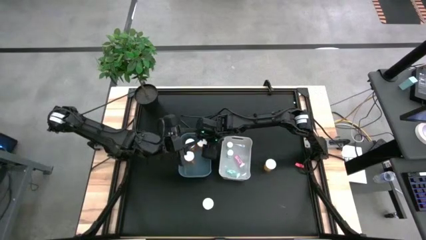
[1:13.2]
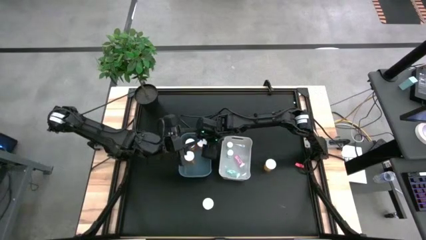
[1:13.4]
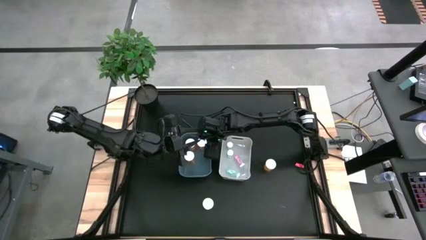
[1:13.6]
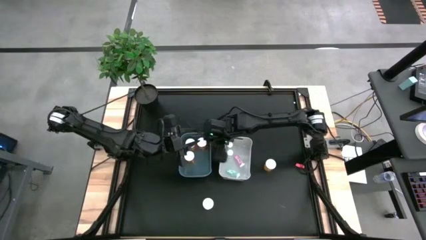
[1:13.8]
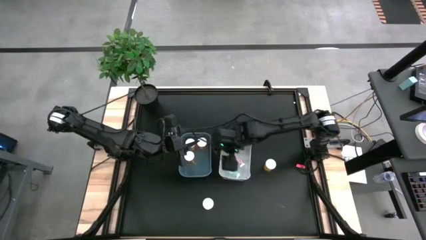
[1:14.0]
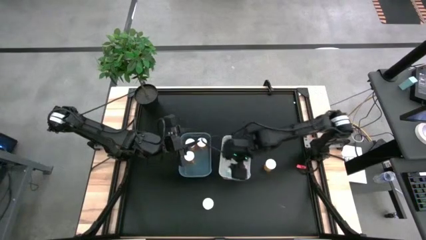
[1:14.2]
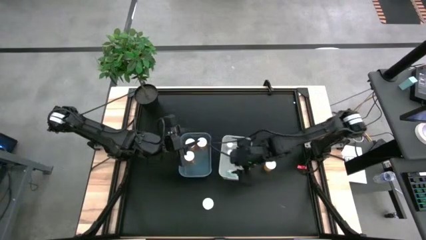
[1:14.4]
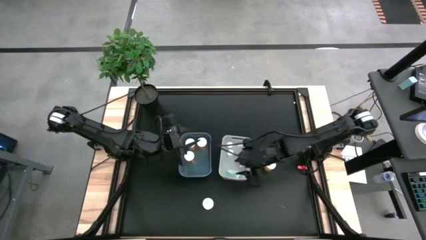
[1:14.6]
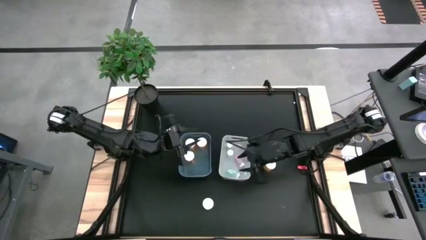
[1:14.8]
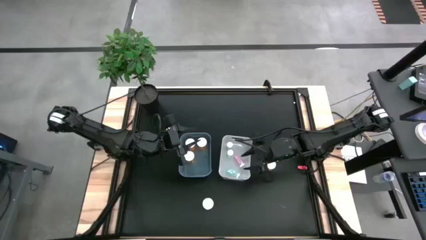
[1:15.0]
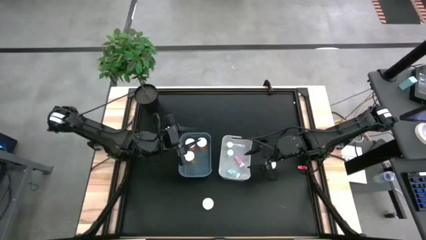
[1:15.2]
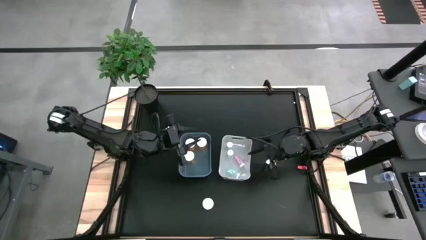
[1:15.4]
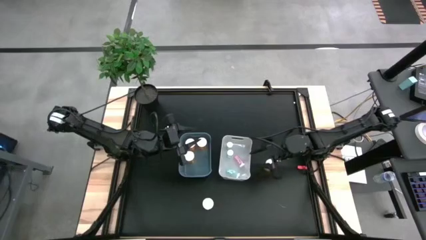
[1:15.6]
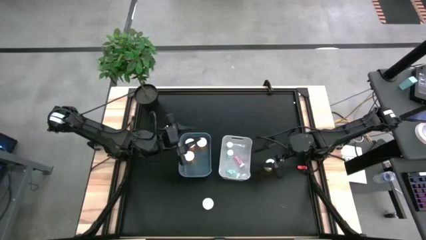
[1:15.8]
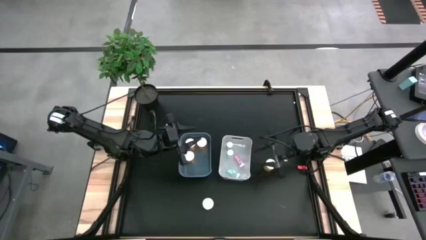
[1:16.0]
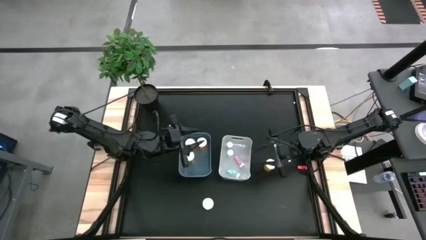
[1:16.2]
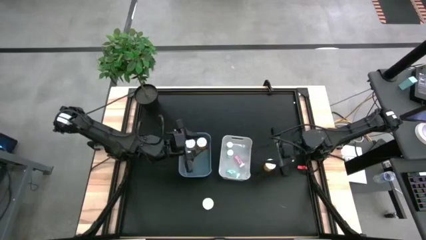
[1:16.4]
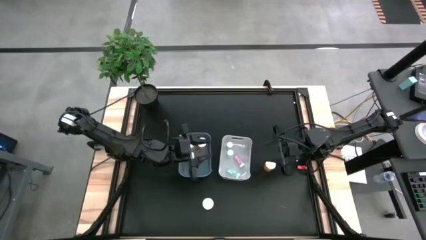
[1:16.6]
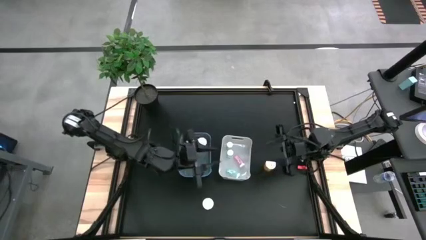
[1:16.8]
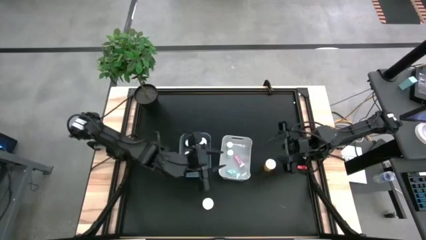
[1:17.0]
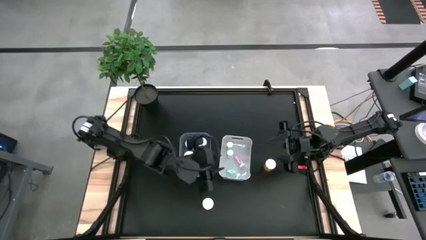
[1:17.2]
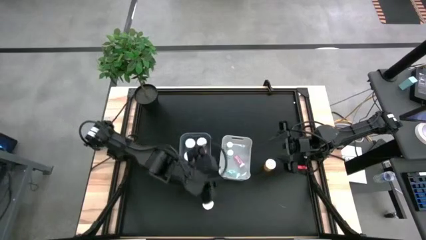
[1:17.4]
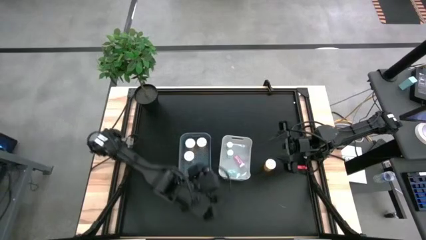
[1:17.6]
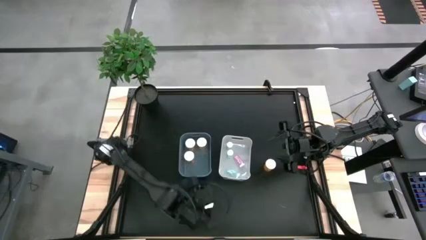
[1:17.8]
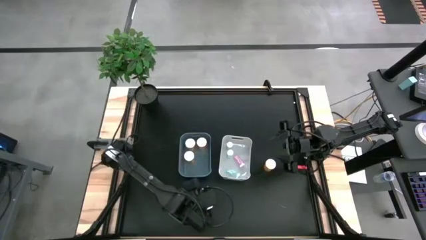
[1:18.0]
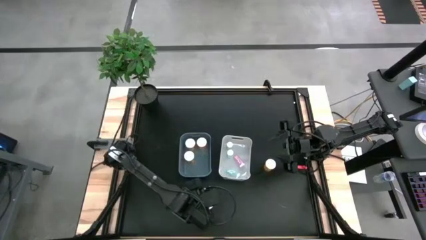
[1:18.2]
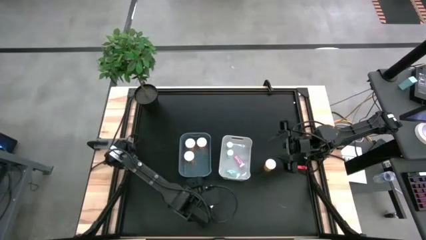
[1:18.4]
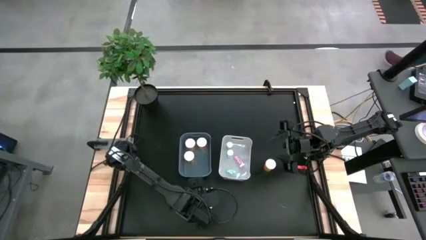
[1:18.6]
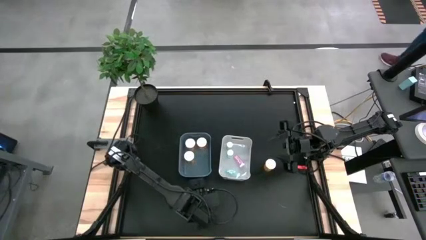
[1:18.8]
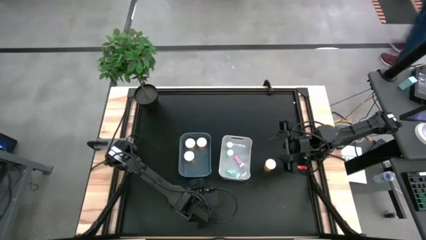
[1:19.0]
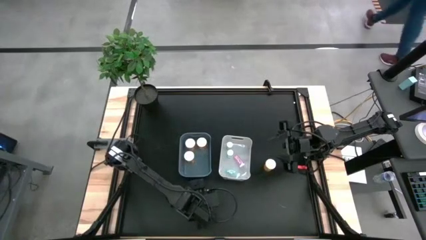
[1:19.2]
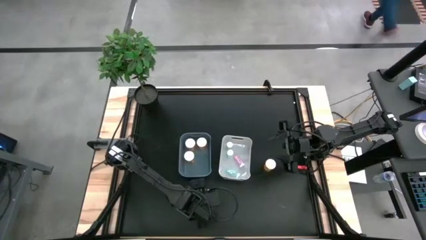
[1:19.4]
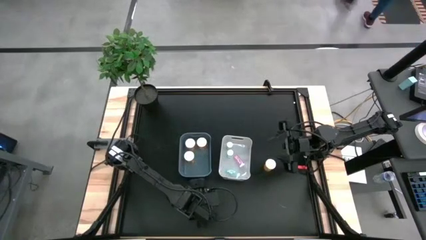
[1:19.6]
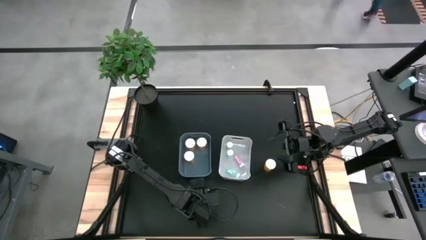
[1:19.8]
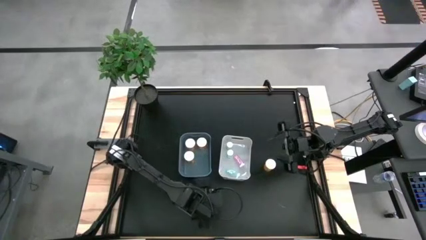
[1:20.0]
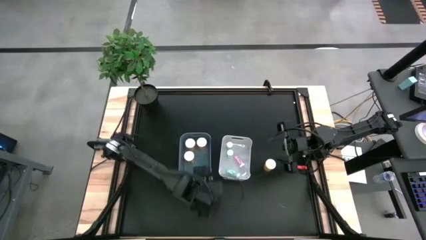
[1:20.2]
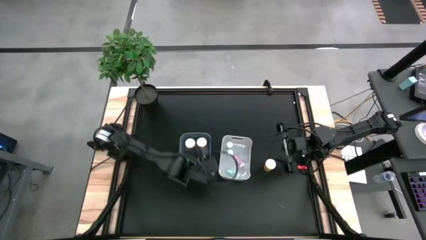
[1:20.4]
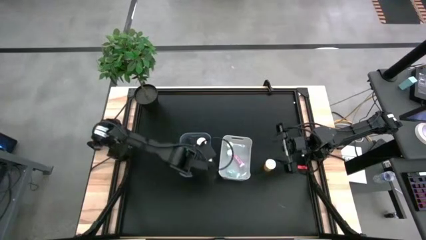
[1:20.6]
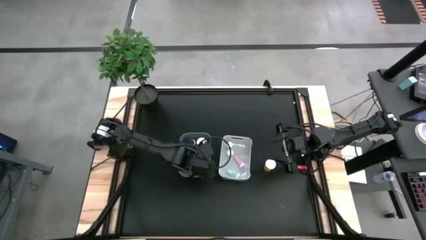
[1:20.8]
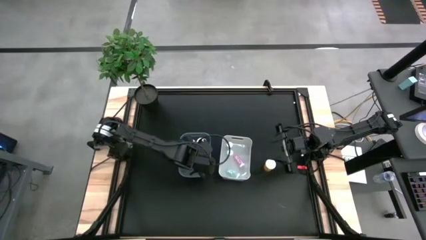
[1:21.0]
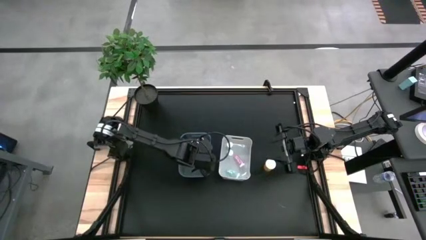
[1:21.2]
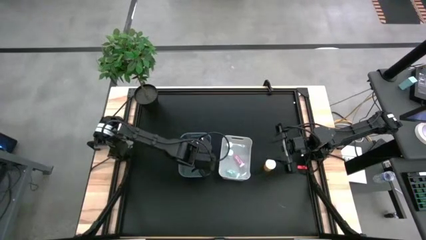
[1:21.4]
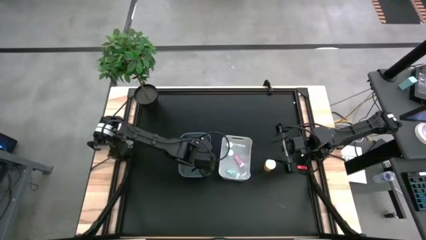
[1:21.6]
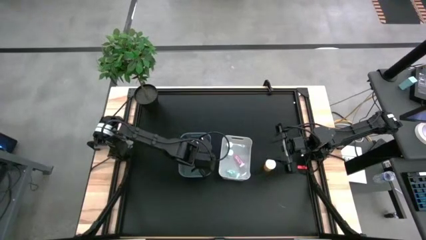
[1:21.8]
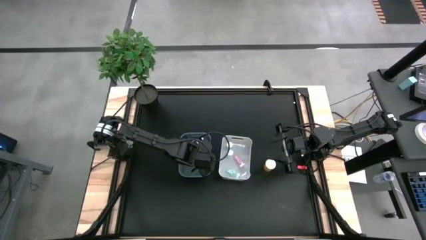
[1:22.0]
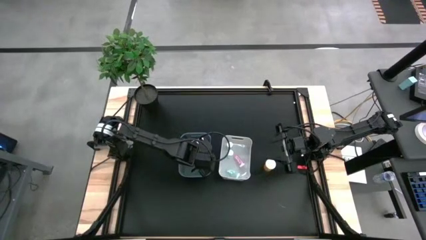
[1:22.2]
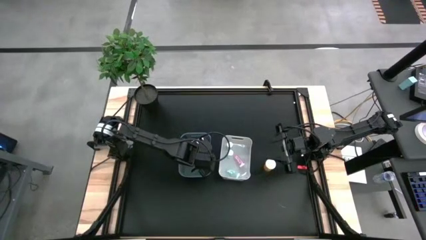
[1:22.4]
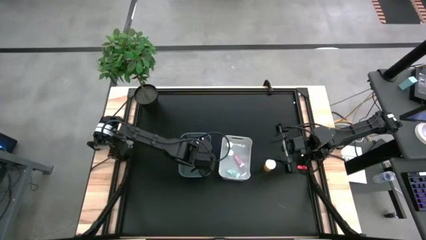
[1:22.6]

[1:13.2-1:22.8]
Task: Pick and place medicine bottles into bin by pill shape (circle, oval)
Put the orange capsule bottle into the blue bin

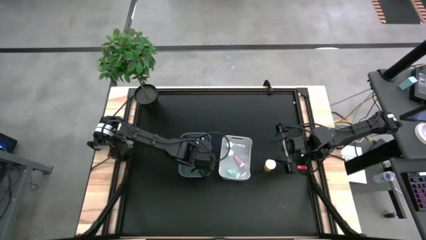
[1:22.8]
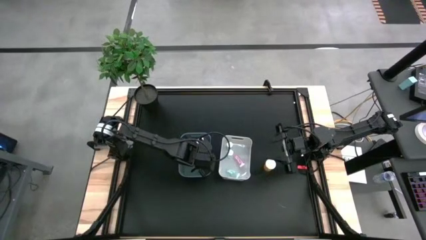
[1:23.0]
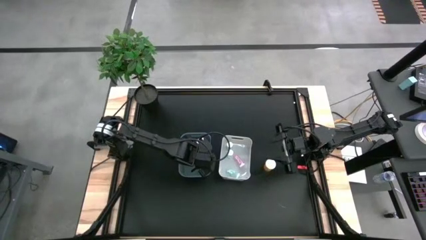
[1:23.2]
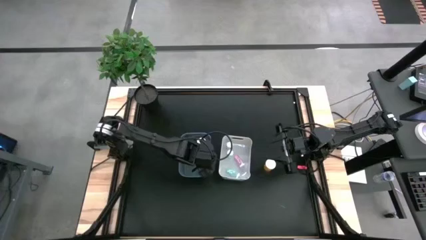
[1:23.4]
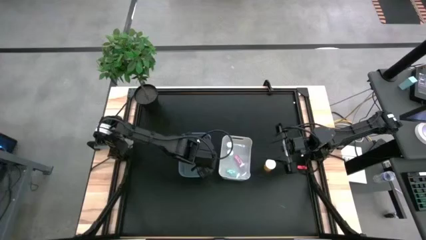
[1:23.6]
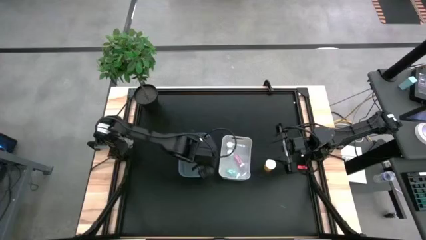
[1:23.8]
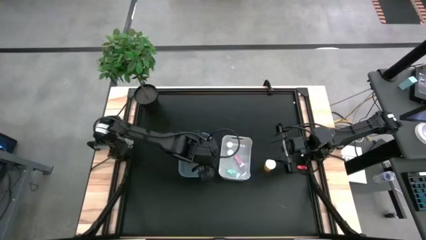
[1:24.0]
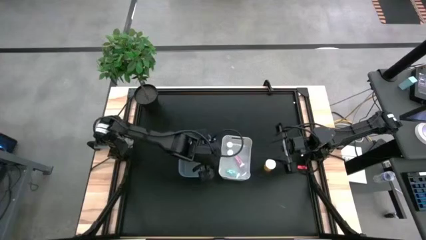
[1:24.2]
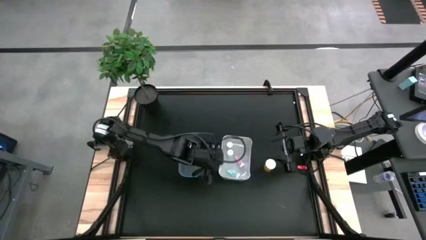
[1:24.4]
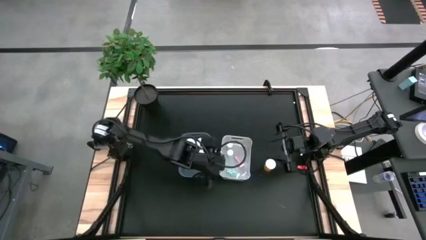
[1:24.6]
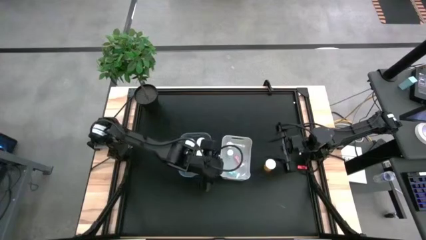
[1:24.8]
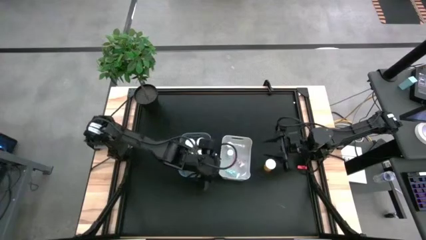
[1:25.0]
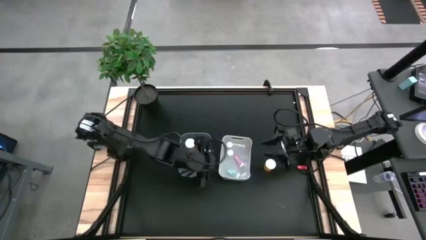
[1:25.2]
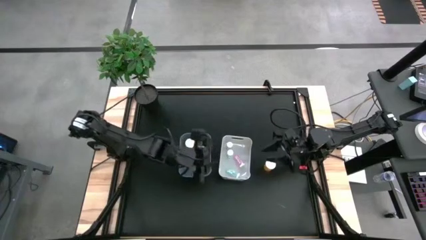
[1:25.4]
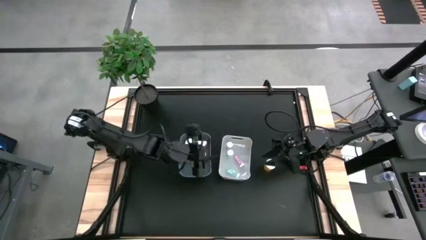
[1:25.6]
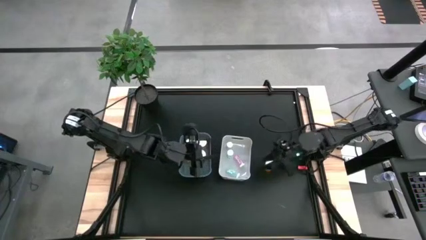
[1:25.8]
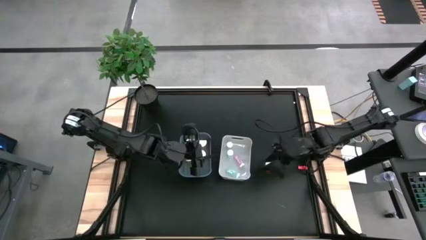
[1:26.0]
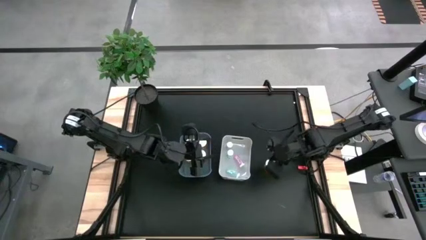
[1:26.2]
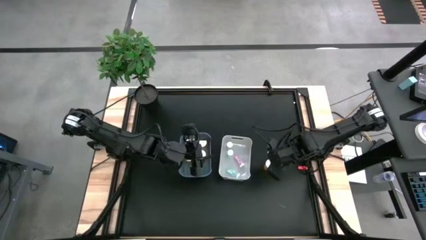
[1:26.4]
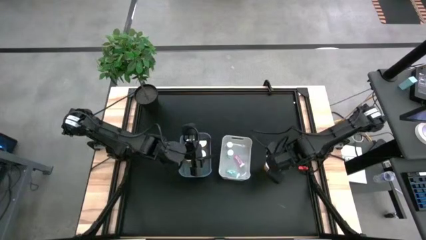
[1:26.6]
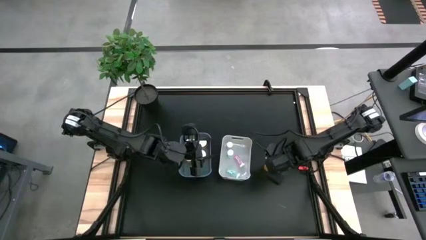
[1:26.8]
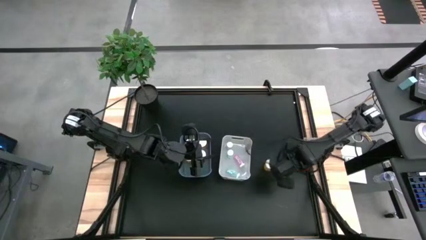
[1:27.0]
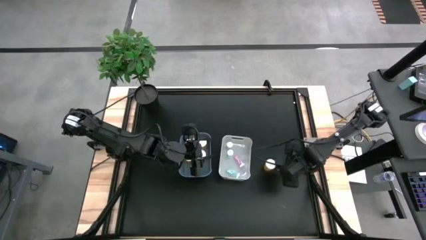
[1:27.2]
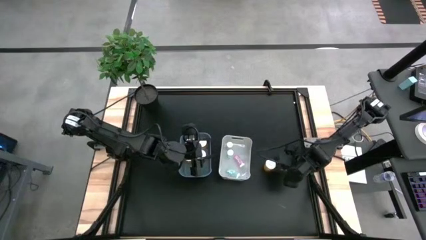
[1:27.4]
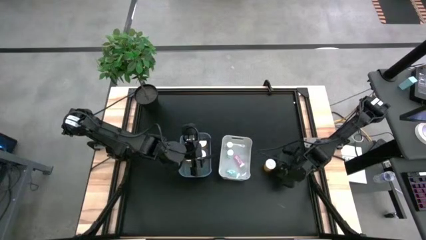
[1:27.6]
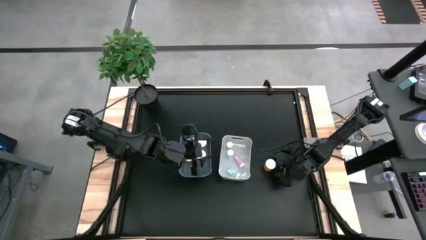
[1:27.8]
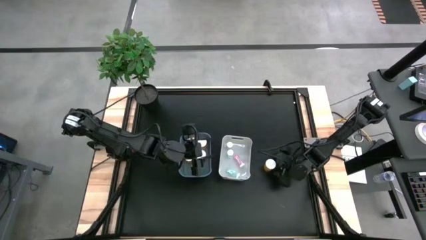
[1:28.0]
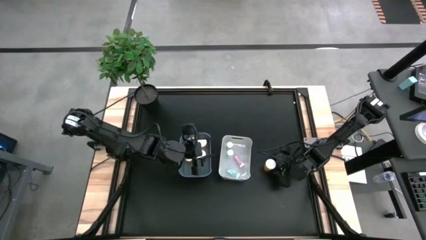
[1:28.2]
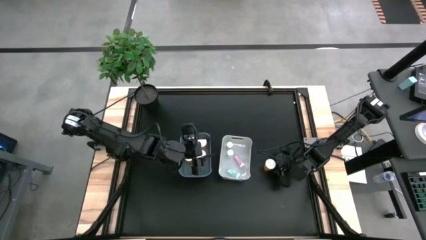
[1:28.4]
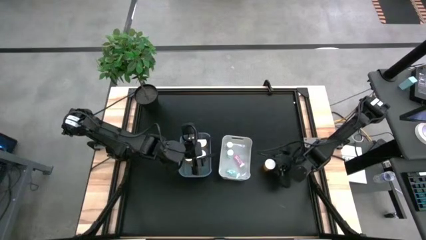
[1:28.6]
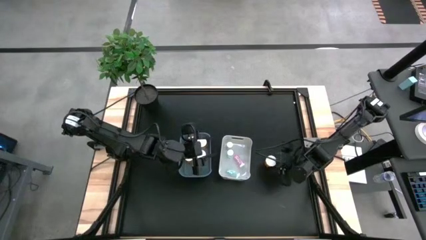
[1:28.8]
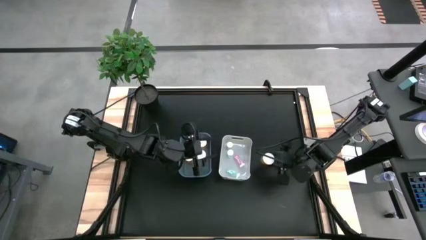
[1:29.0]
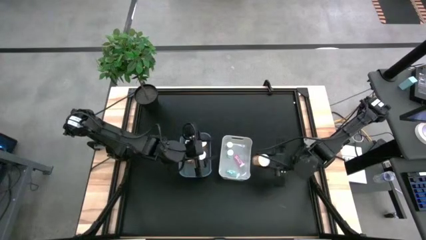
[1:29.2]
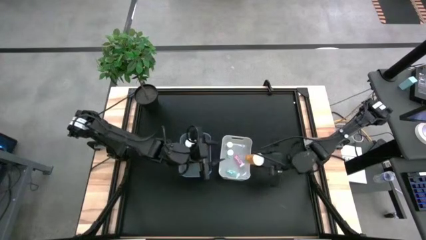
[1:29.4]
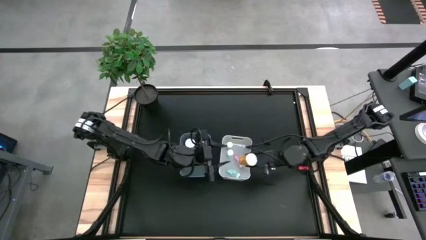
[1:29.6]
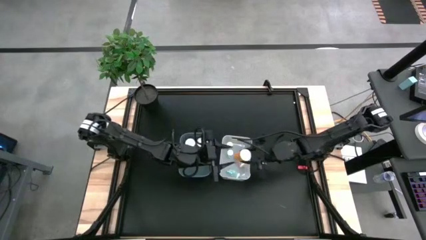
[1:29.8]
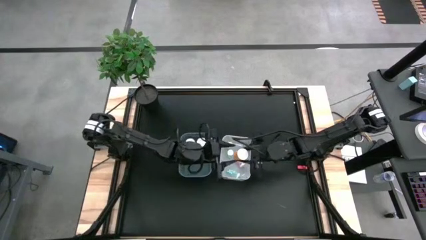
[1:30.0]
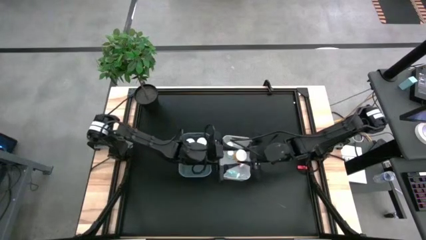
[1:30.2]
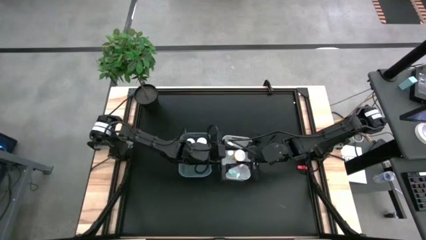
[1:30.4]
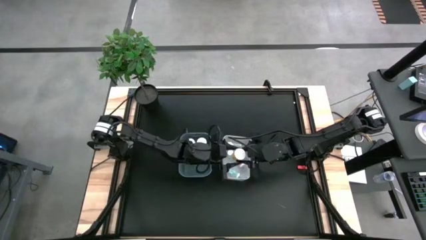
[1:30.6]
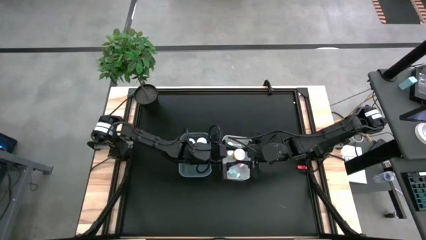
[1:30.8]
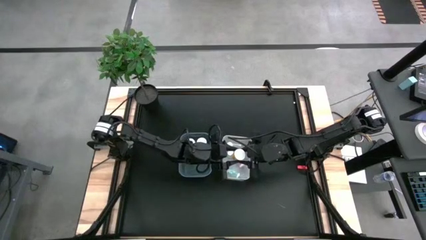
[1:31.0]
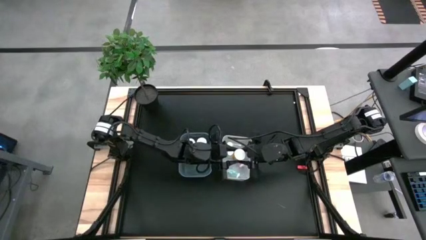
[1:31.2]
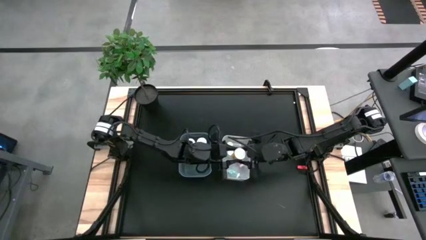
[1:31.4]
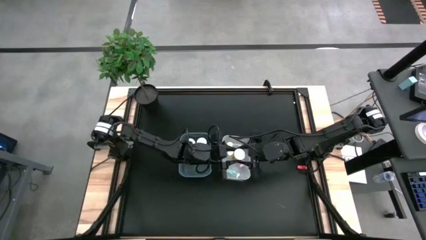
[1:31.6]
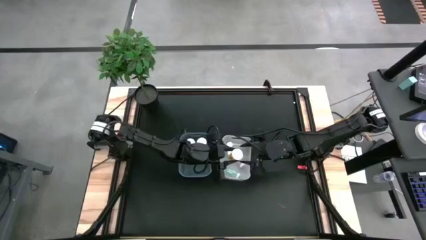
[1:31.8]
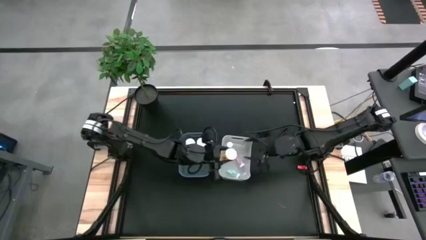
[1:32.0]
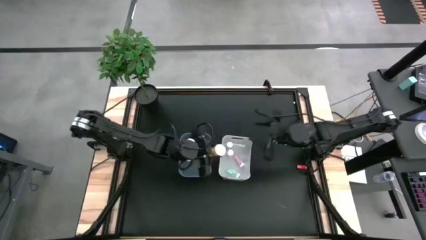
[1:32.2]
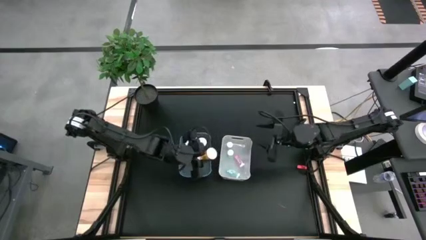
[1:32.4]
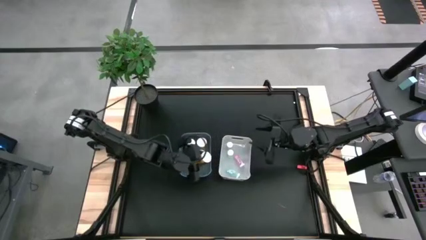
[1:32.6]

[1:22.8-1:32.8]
Put the orange capsule bottle into the blue bin
